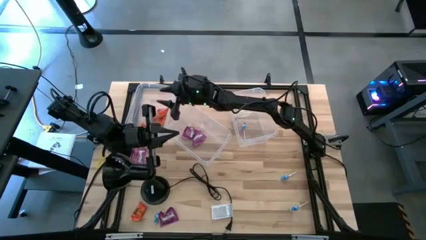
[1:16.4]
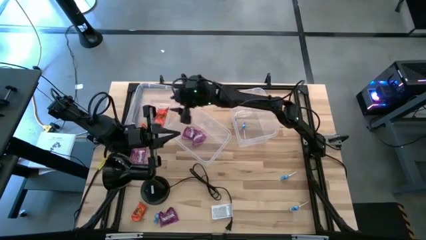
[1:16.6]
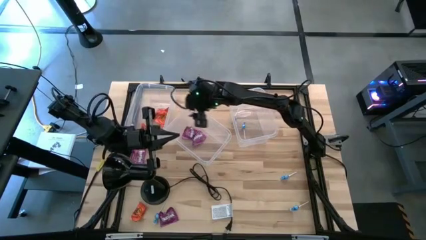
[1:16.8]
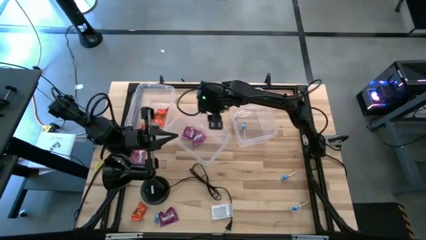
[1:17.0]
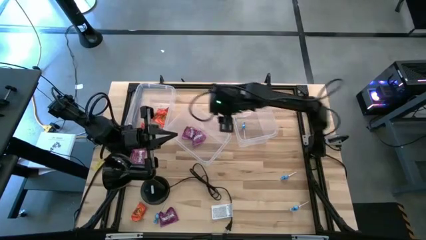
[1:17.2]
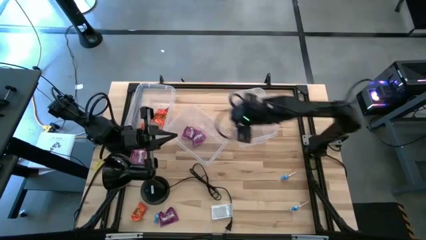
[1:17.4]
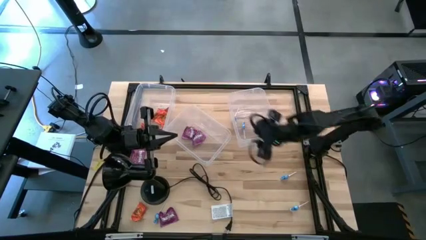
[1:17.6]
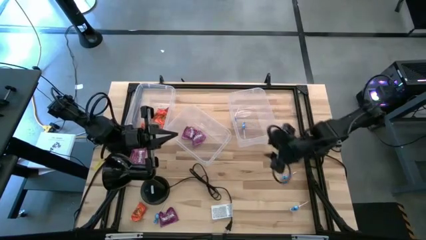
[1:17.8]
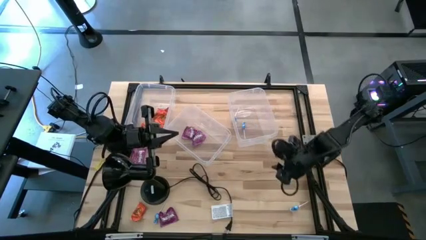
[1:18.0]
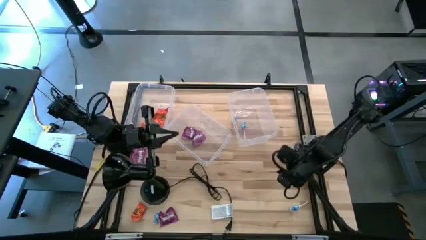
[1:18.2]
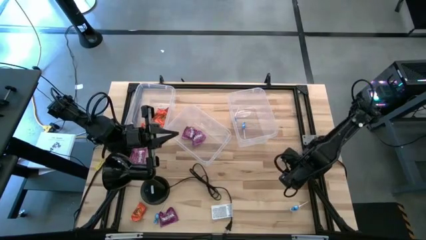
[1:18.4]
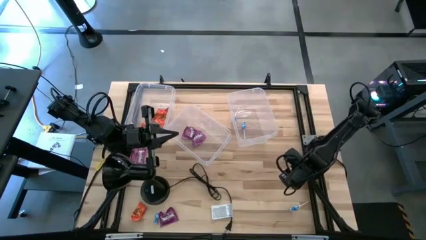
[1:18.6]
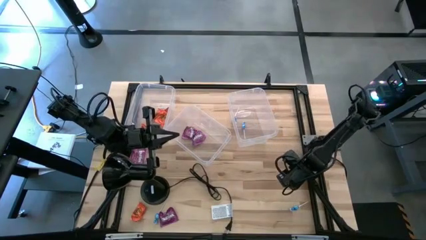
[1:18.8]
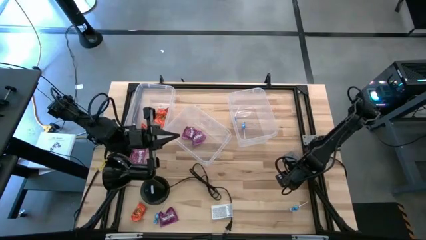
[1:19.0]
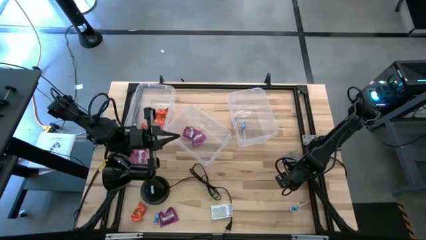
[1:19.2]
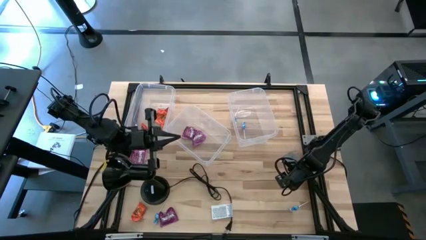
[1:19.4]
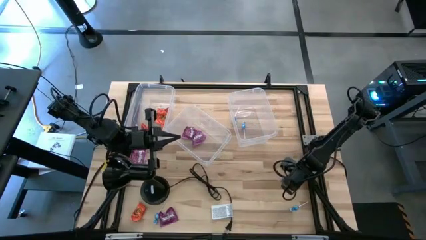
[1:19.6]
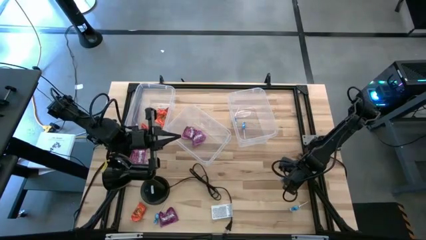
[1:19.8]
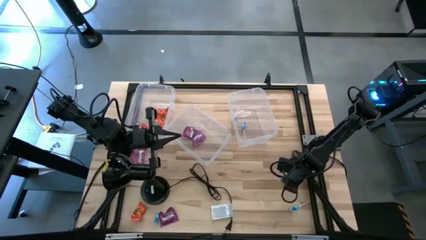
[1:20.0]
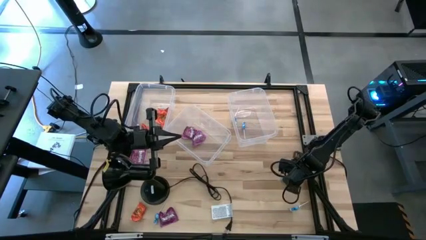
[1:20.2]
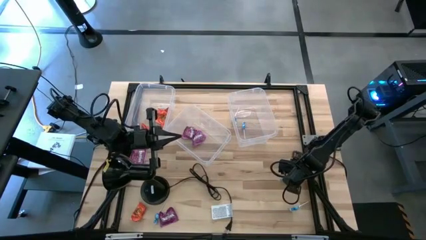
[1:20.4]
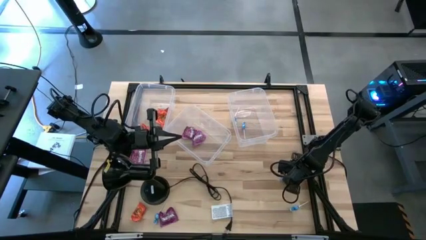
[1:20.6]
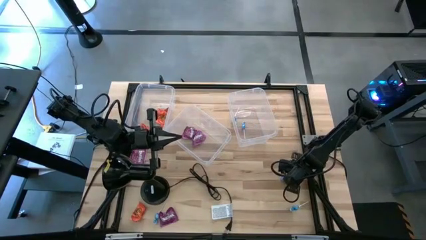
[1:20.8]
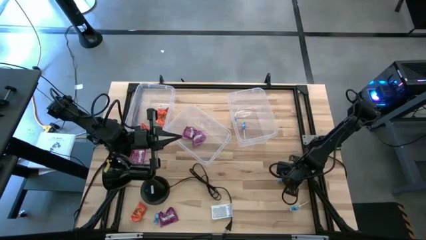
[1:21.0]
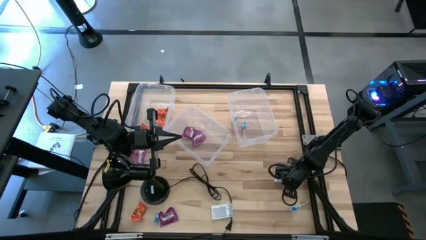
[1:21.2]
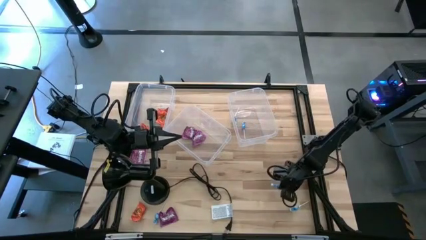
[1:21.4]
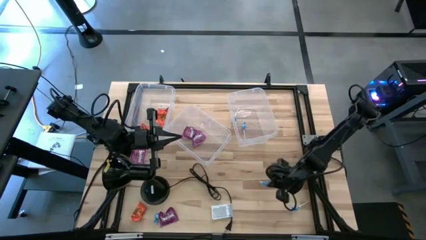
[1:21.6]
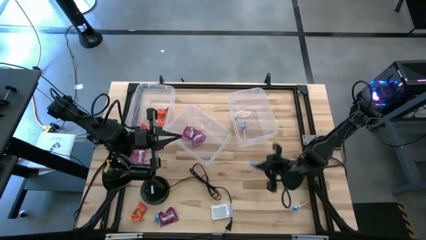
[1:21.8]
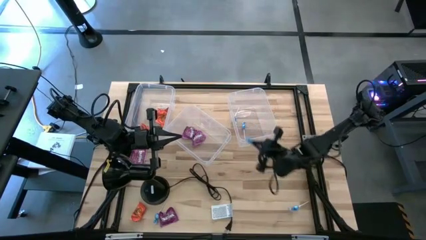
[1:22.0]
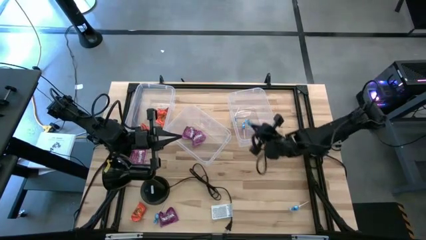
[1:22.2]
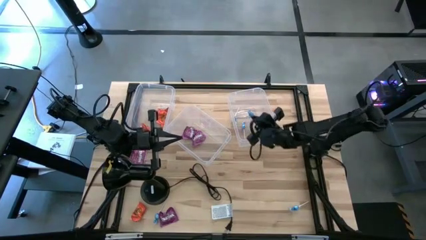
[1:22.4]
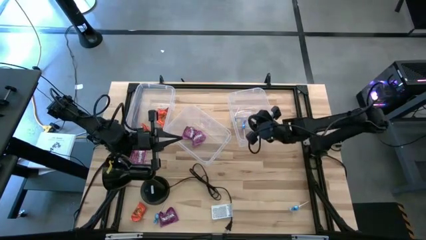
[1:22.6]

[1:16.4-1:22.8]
Task: Sort candy
Put the blue candy into the right transparent bin

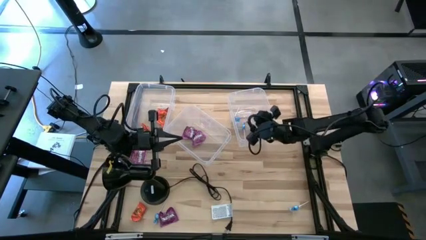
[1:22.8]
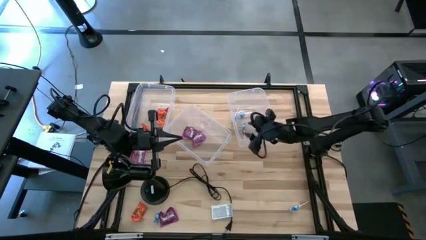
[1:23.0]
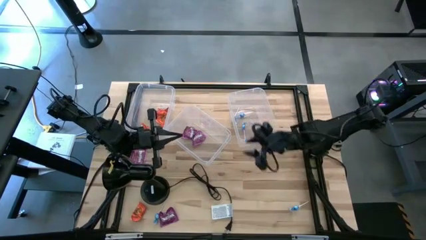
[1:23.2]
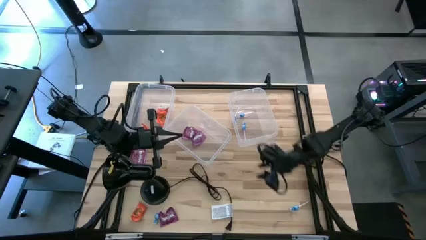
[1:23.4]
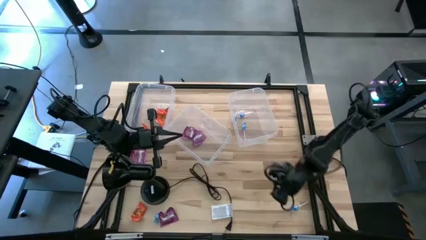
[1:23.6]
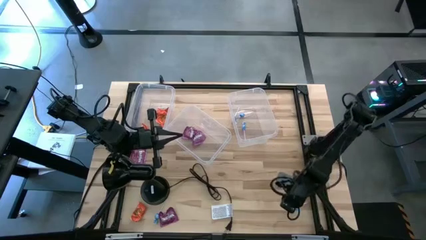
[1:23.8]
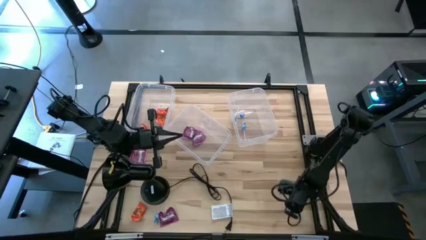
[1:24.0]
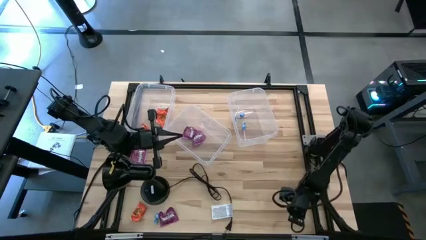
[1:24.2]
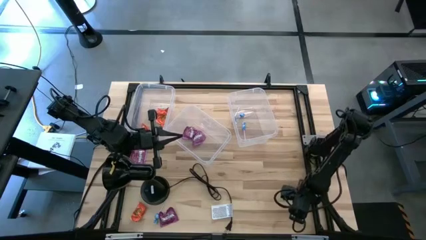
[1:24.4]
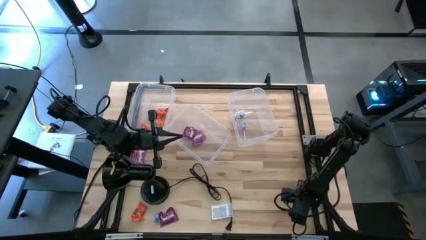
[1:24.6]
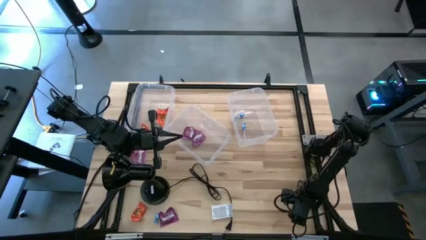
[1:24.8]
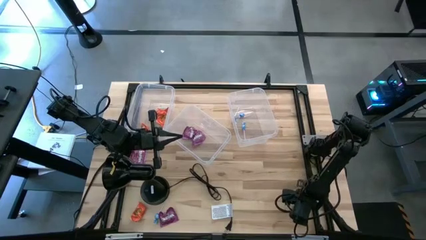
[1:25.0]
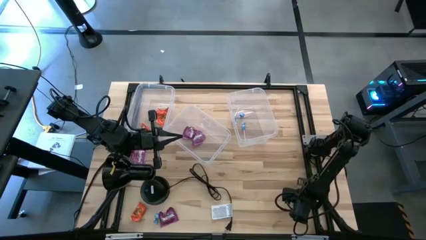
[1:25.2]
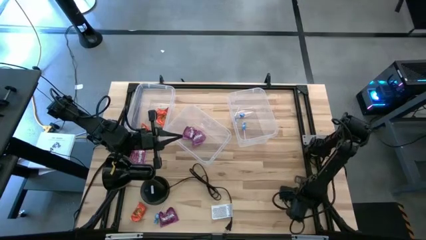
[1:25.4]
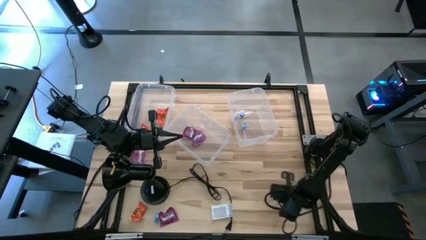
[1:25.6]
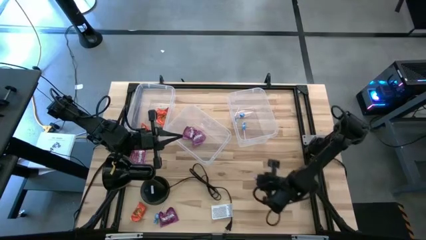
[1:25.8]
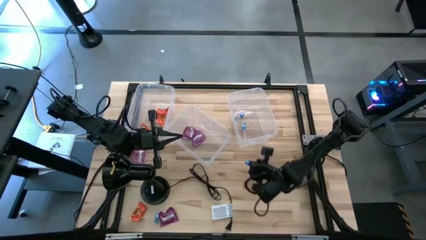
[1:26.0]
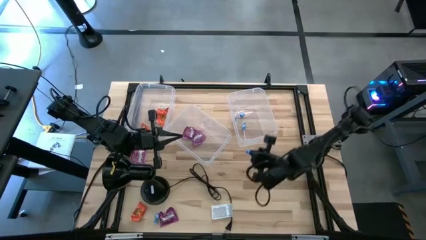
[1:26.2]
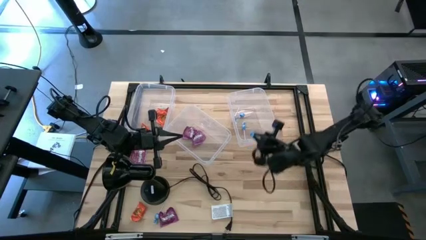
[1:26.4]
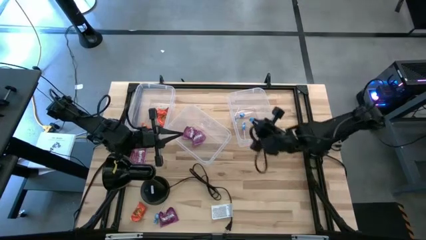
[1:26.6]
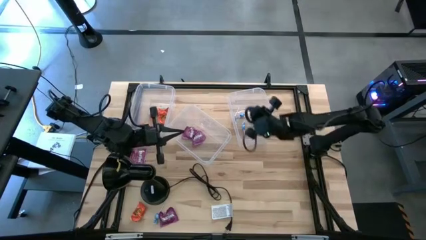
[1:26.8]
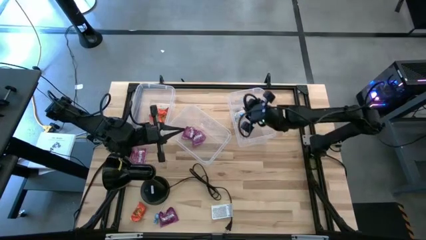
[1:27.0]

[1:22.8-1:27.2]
Put the blue candy into the right transparent bin

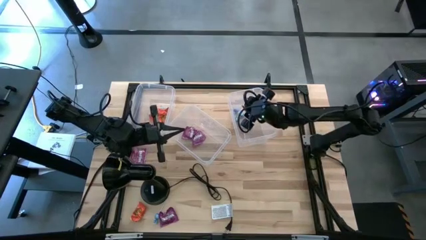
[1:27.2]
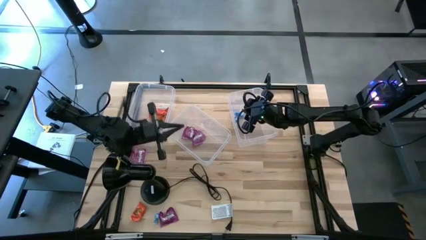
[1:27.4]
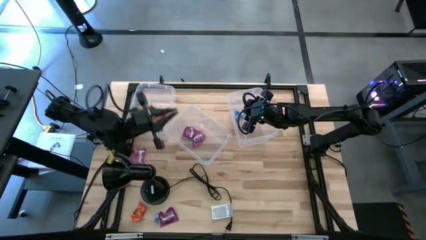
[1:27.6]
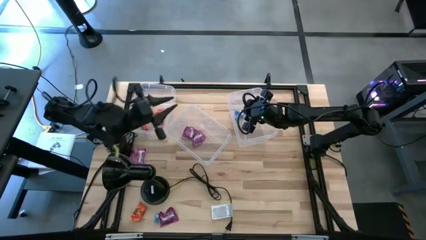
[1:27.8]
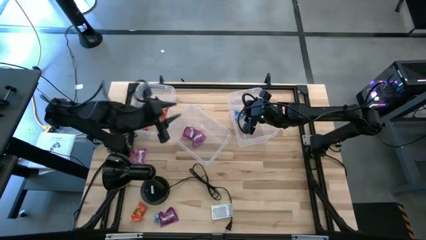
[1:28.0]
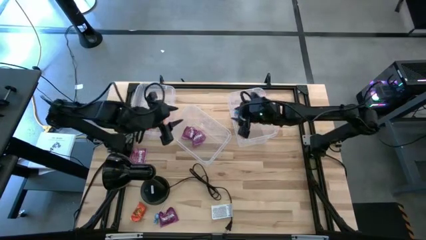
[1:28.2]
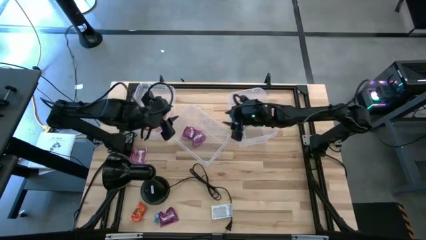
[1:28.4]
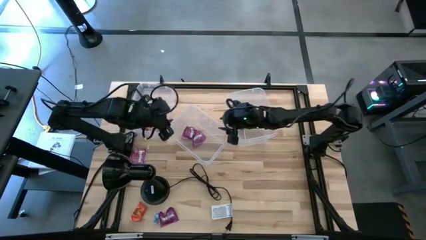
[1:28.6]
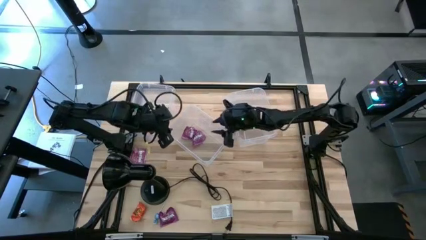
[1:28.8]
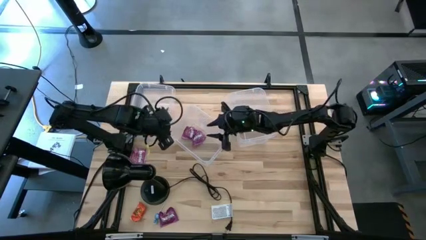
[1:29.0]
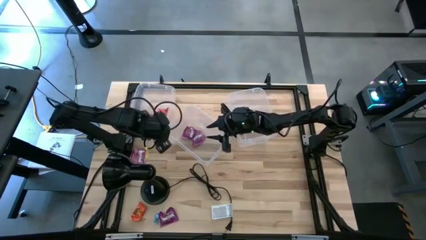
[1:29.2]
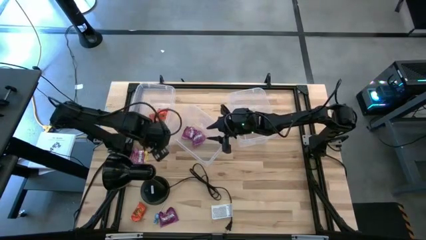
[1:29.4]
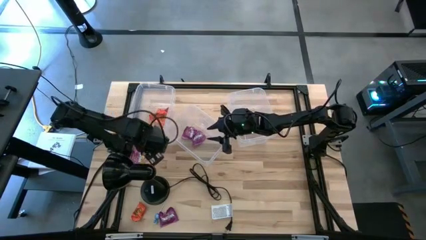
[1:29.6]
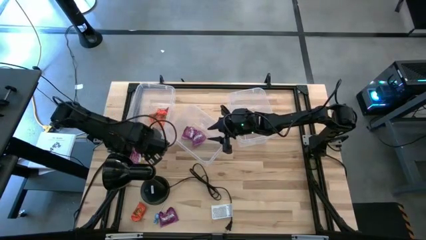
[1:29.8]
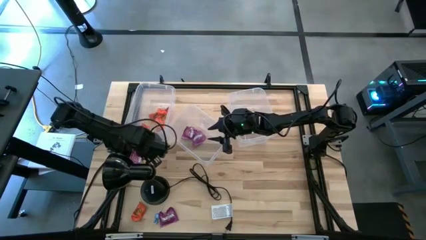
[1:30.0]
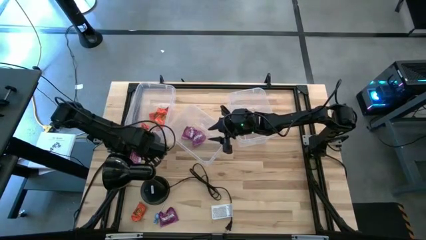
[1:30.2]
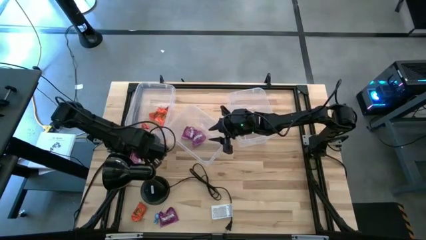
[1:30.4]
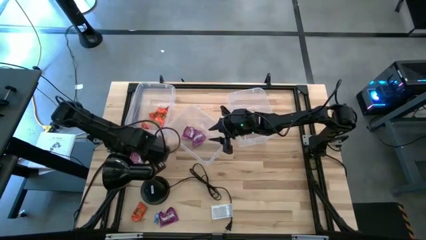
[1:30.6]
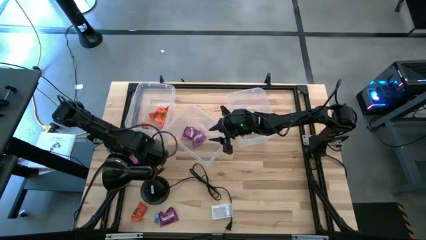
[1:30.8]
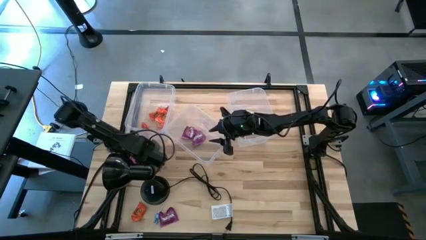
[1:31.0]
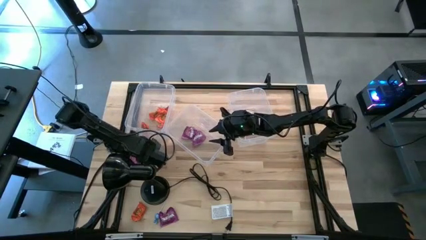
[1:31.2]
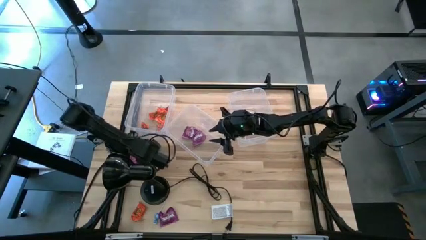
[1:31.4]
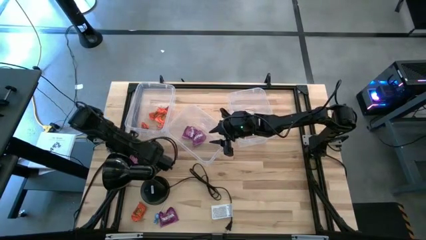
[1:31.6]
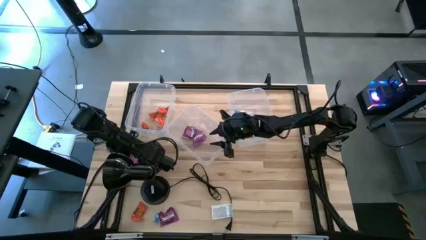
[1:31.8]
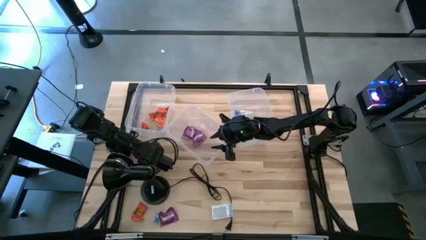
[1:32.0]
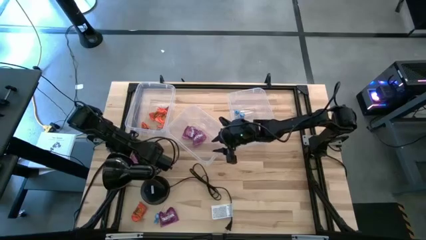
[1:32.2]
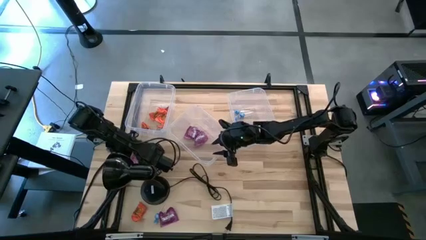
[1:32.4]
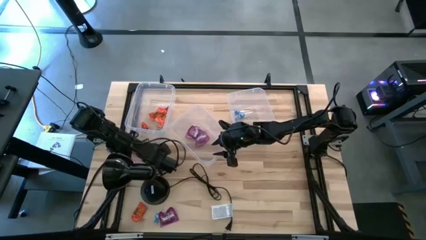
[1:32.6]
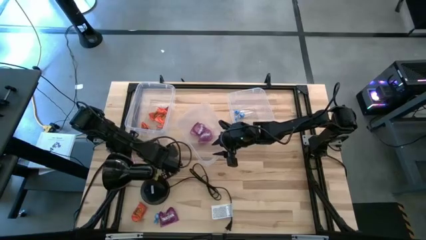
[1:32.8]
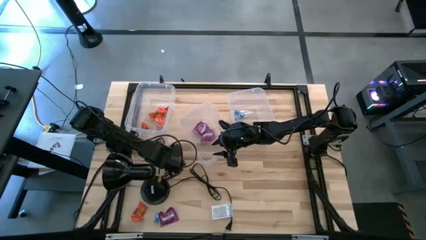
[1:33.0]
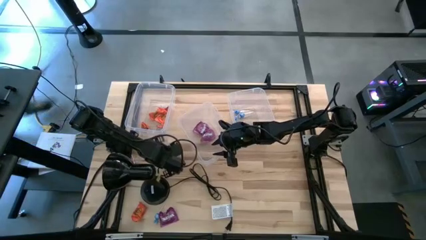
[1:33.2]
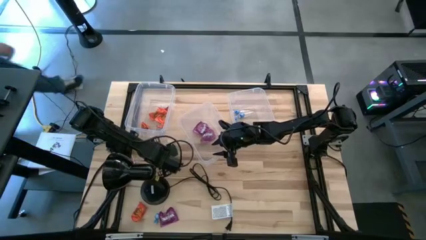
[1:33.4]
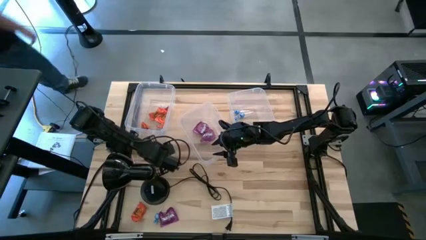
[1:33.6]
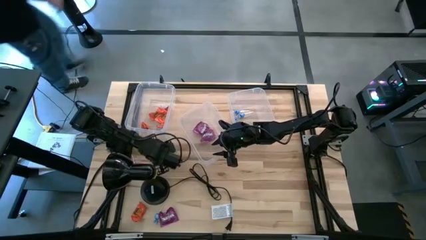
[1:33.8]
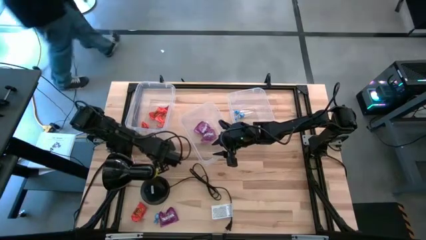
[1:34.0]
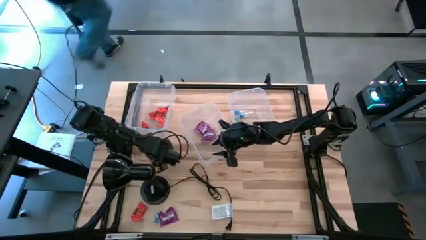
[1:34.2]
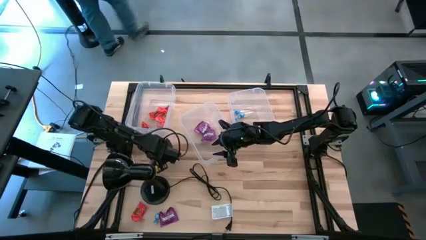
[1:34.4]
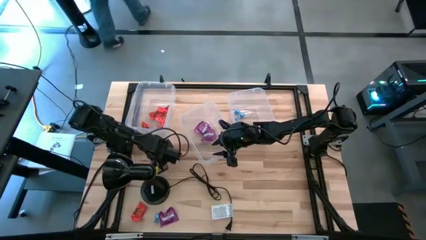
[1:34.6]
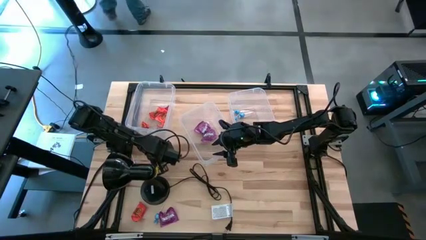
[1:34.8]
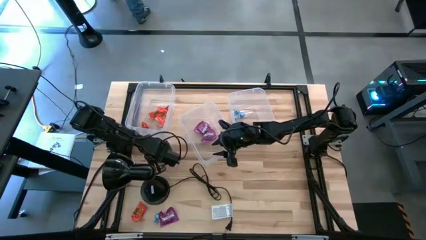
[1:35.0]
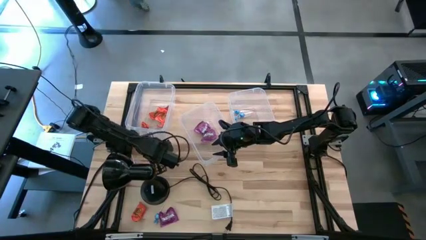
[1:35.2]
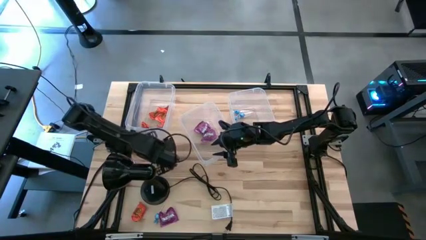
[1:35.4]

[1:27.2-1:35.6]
Put the violet candy into the center transparent bin
